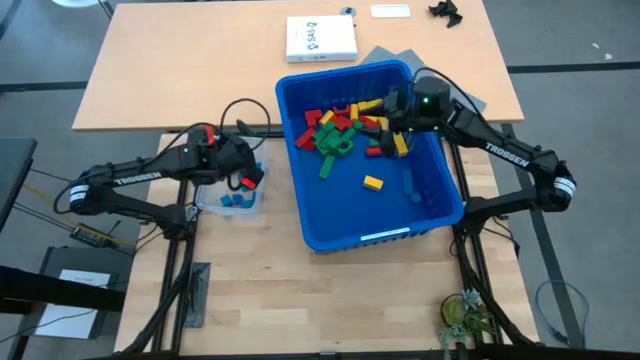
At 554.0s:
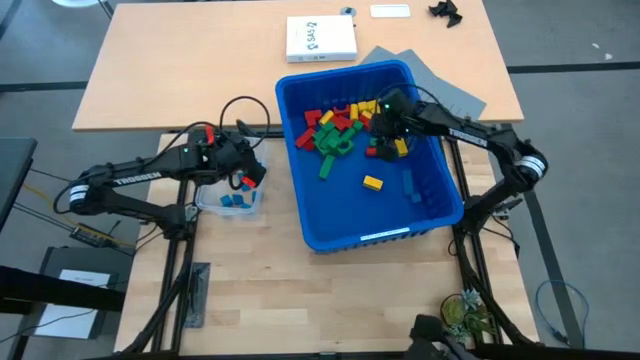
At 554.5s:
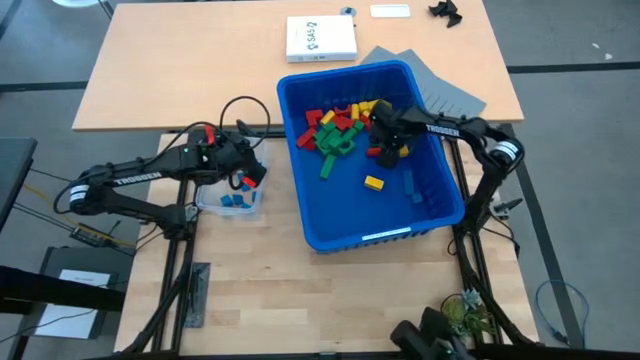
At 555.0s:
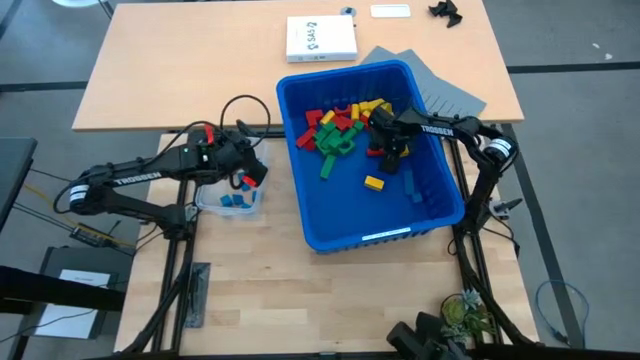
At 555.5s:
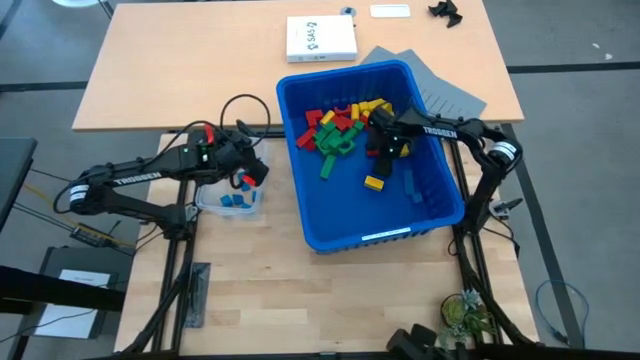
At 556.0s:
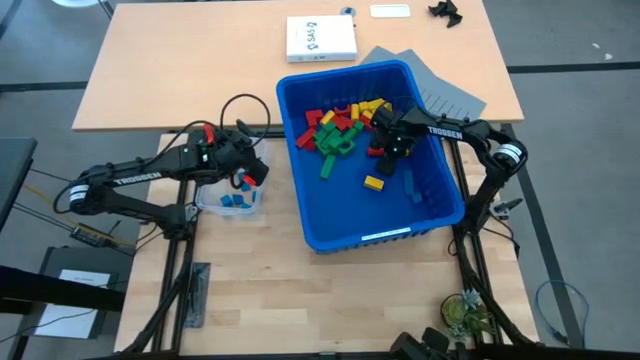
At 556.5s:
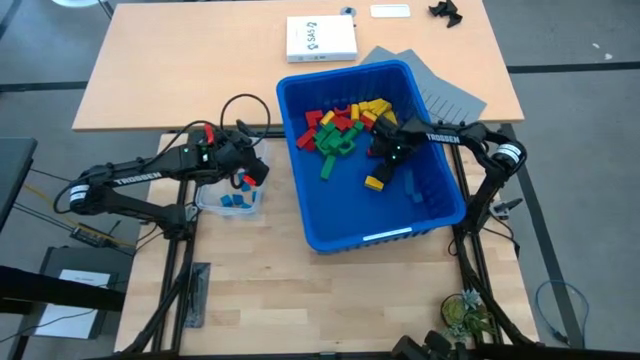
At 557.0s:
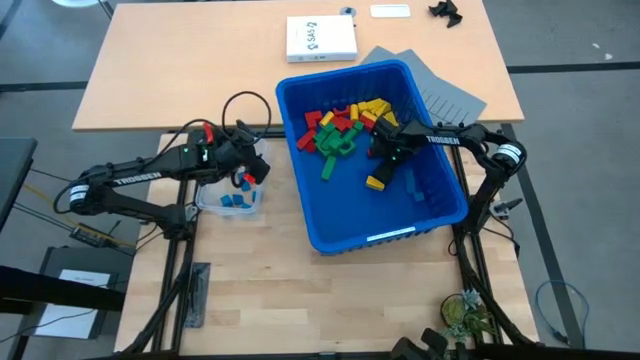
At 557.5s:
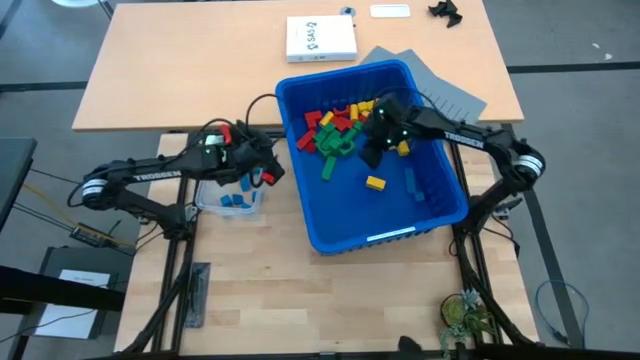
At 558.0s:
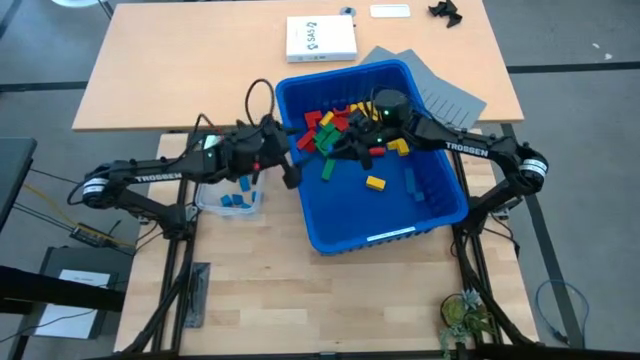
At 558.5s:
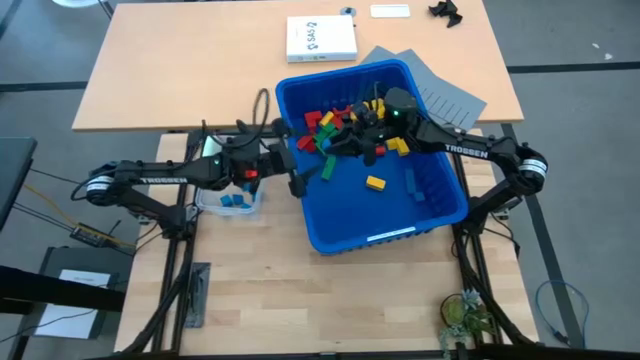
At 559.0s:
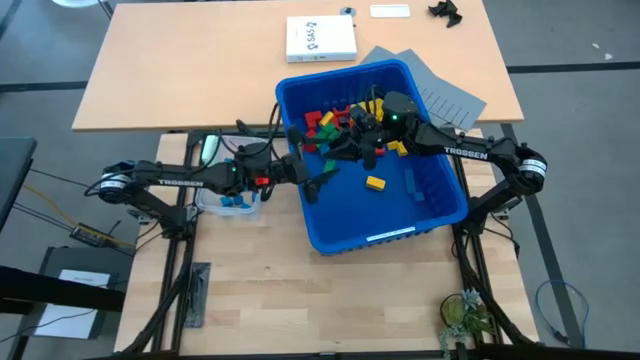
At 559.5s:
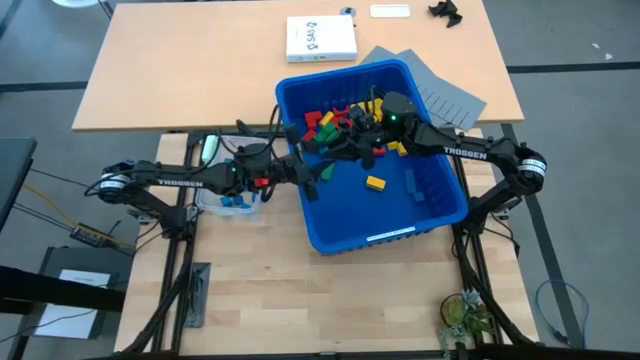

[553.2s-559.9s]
Task: Sort blocks
Put the blue block into the transparent bin

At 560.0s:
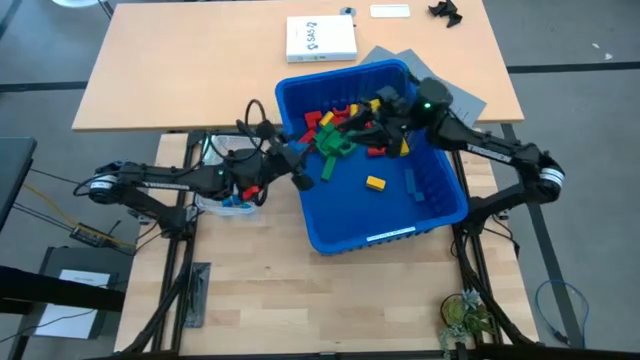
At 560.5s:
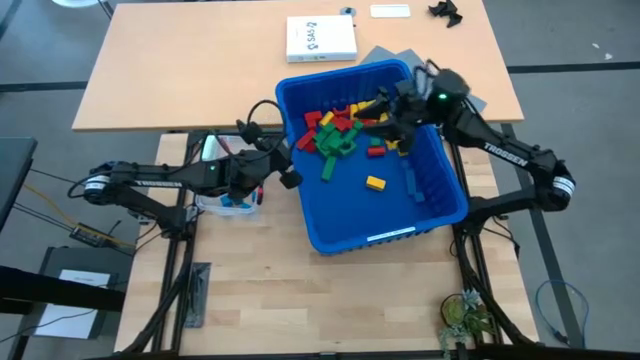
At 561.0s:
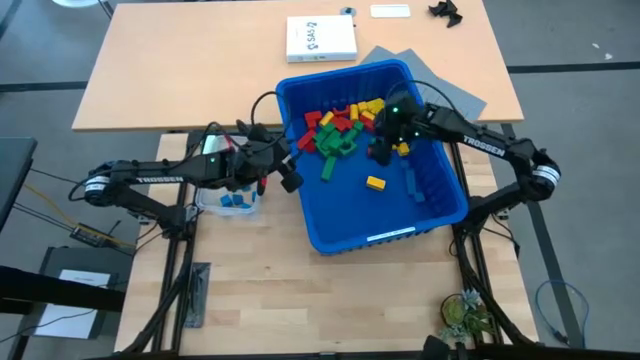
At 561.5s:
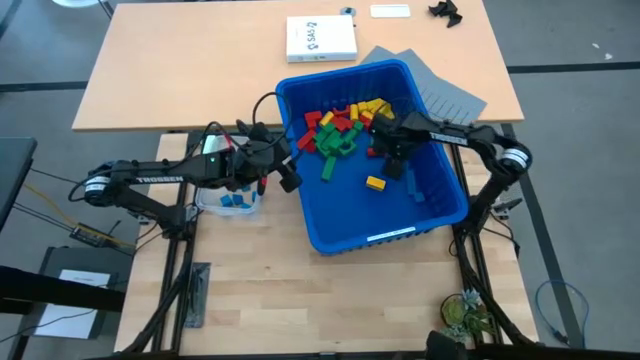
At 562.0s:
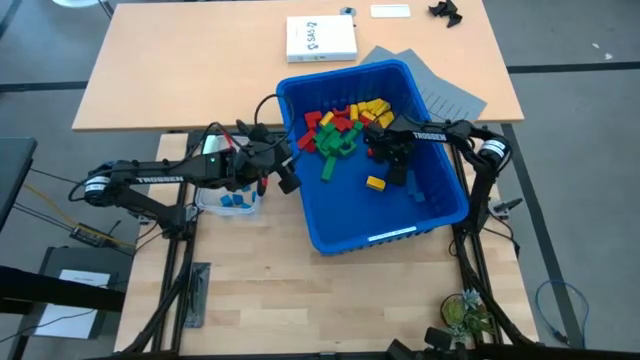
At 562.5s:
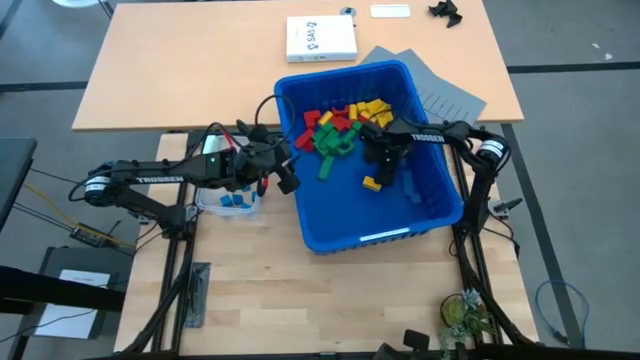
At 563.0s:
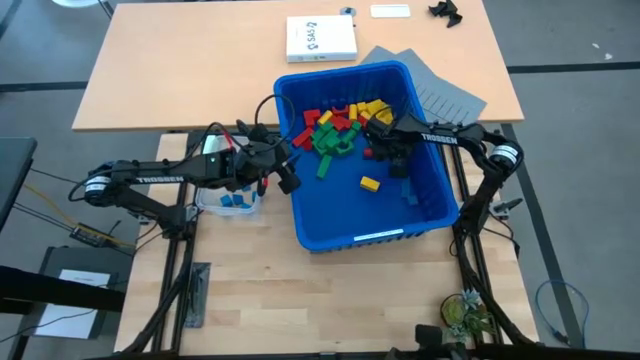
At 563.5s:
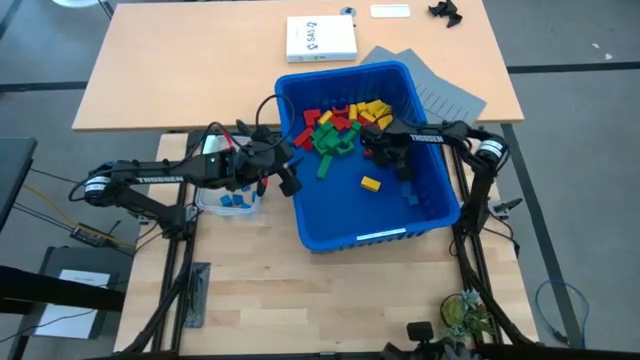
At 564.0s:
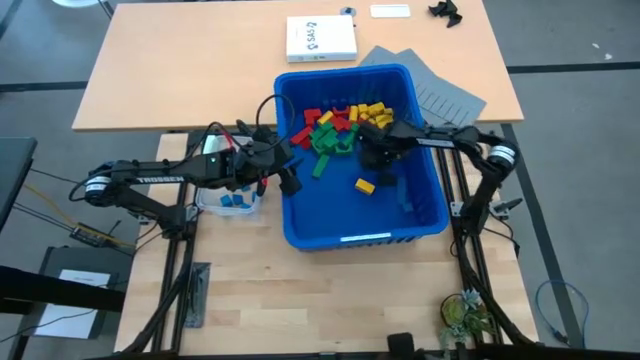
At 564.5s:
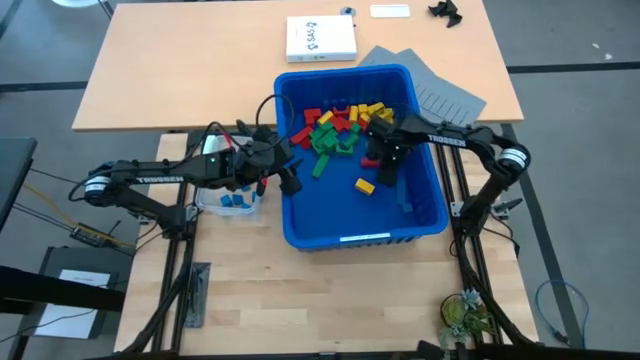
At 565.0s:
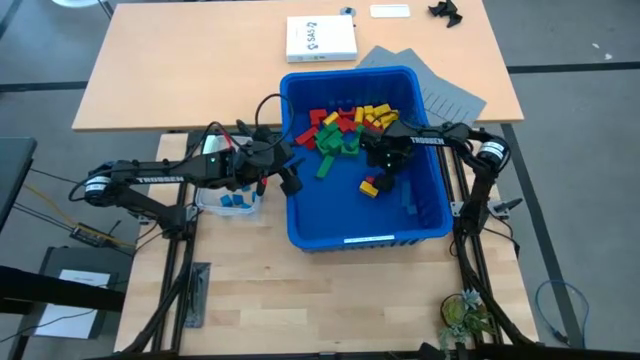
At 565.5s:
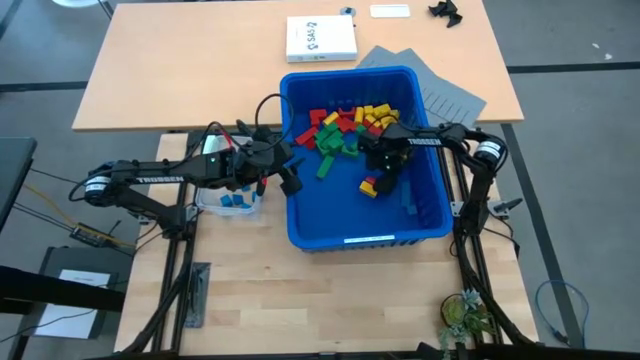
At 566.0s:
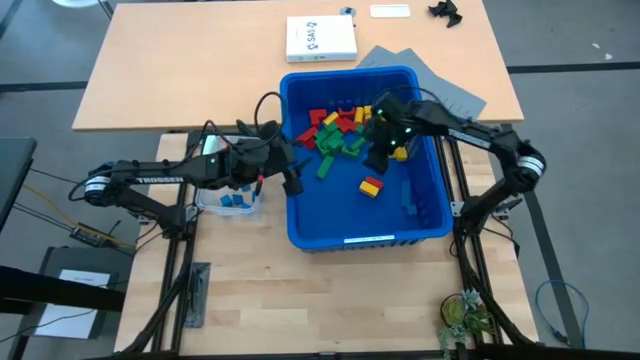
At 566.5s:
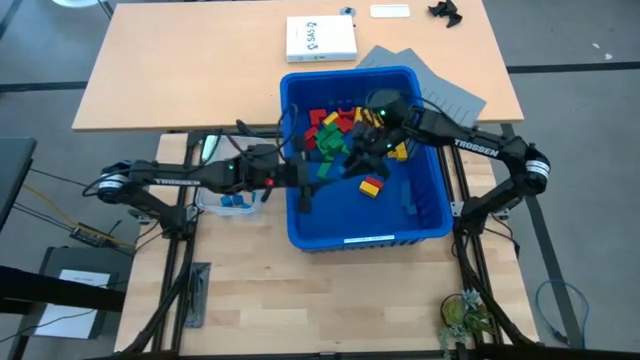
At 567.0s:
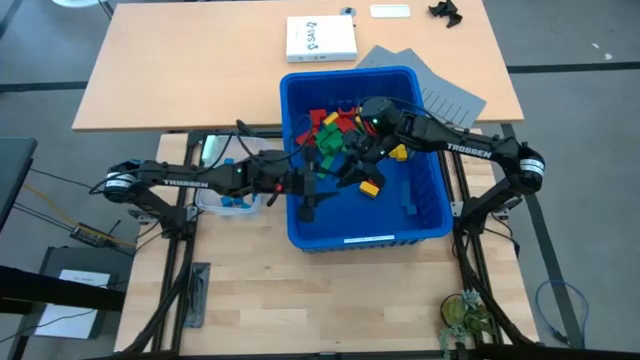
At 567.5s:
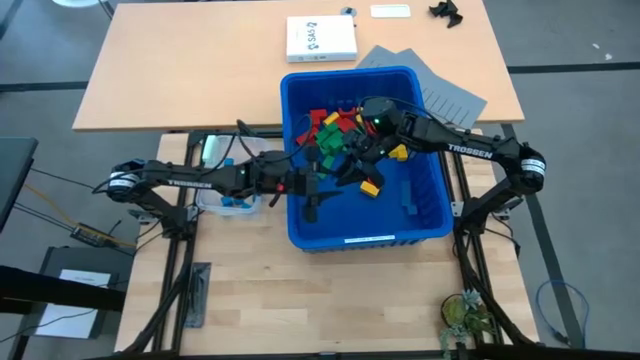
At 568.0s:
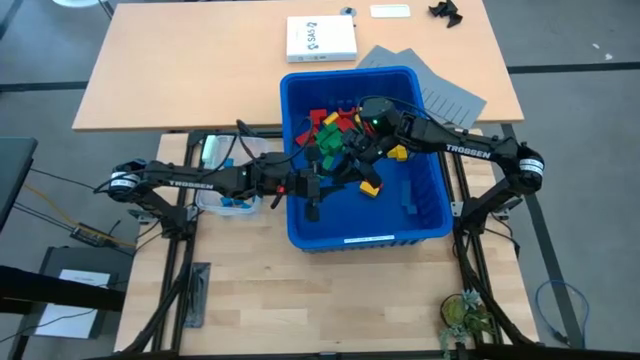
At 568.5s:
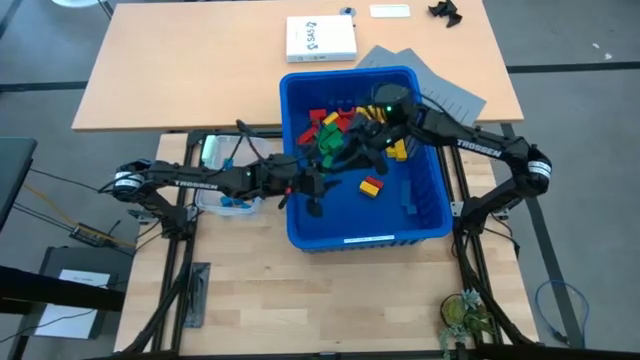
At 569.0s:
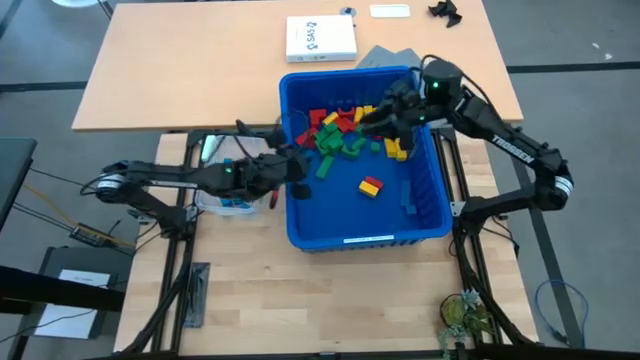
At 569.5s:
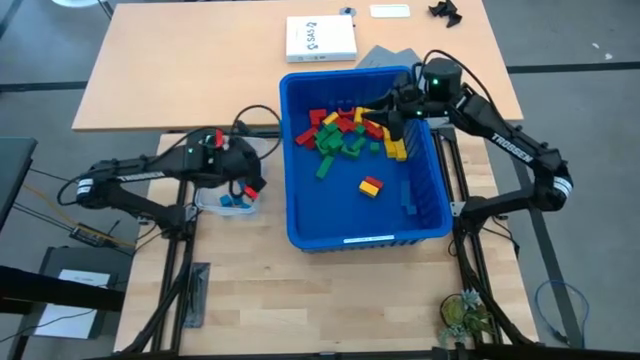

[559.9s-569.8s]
Put the blue block into the transparent bin

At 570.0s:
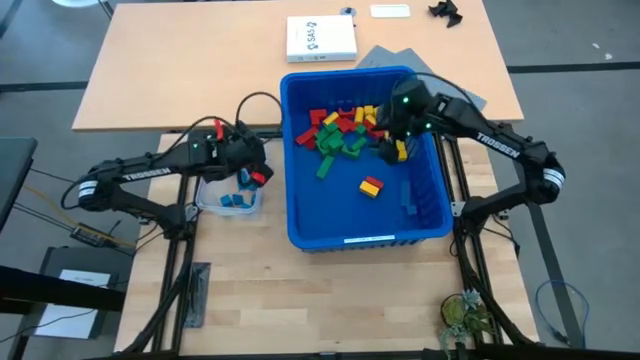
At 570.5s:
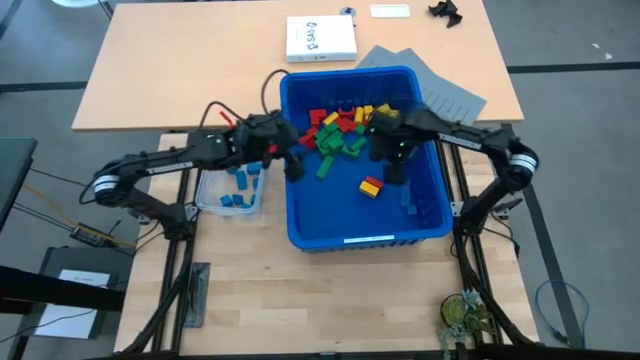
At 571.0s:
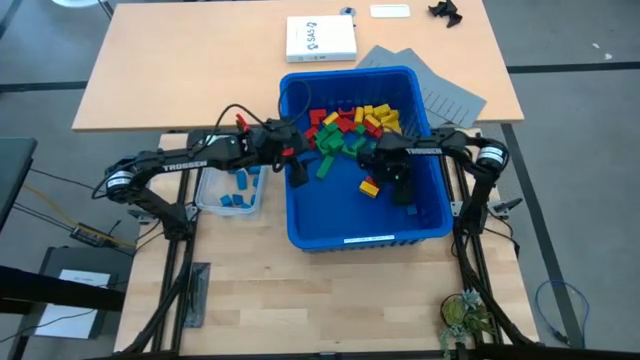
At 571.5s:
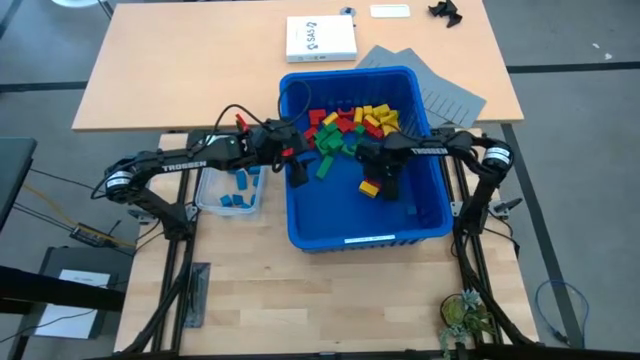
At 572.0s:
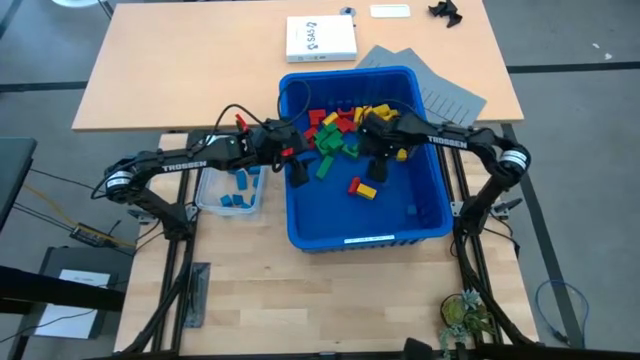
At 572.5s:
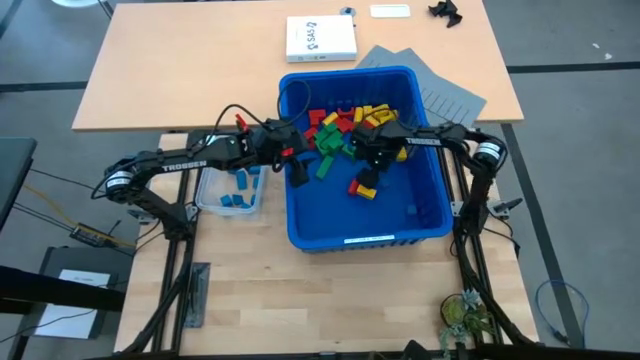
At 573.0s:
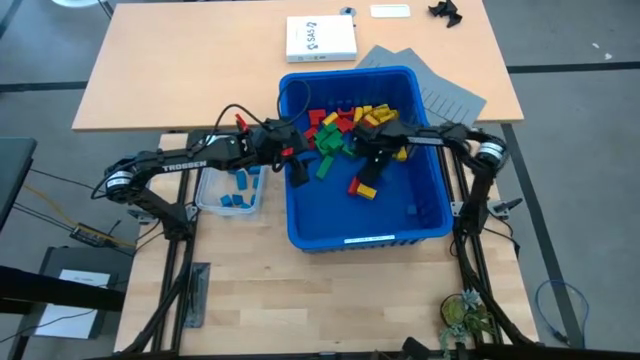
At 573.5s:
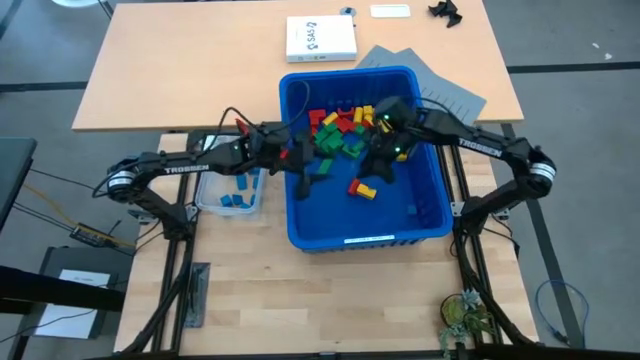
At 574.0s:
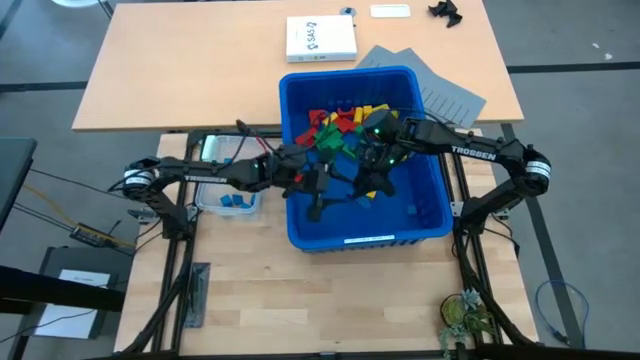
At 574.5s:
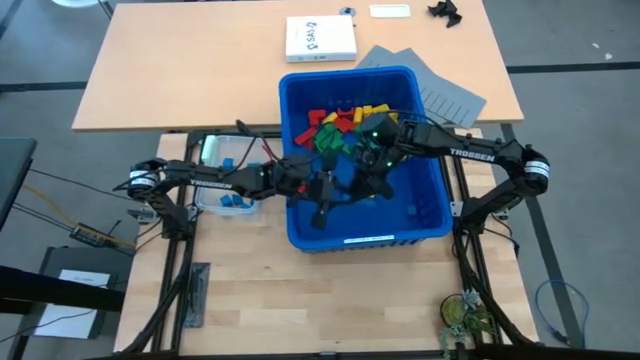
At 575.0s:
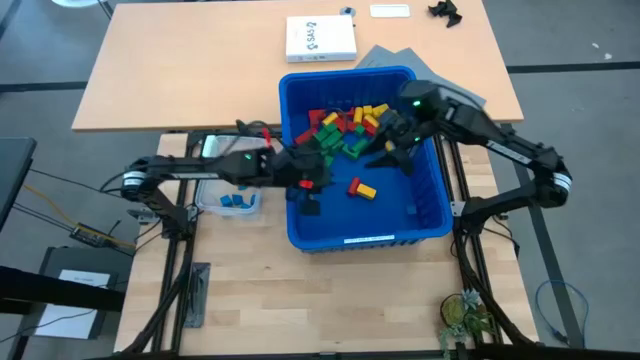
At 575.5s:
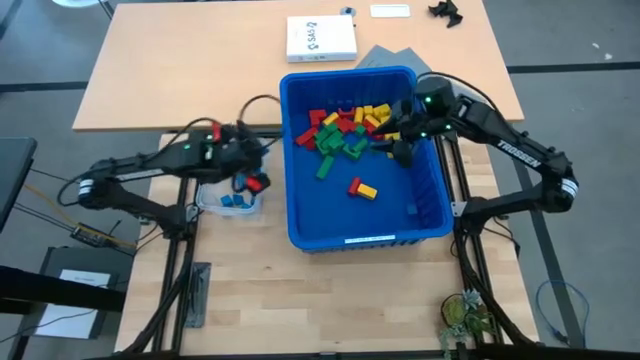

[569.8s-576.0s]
Put the blue block into the transparent bin
